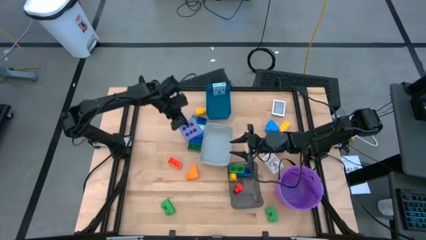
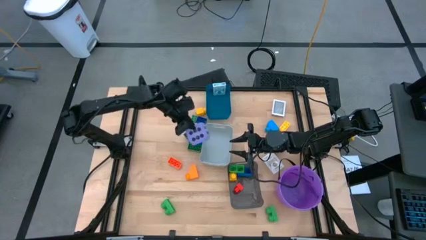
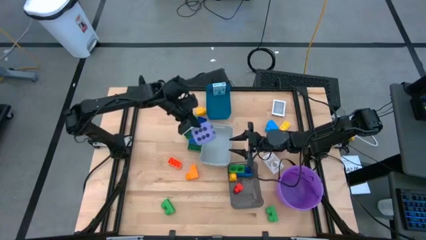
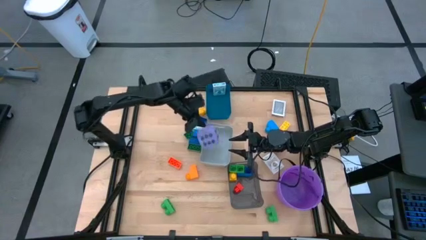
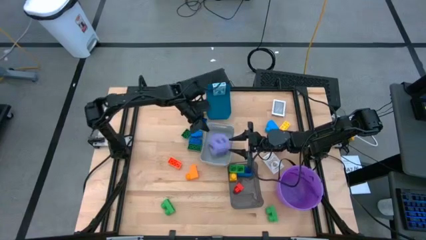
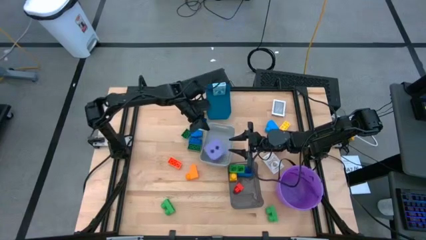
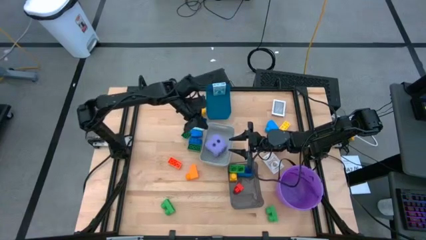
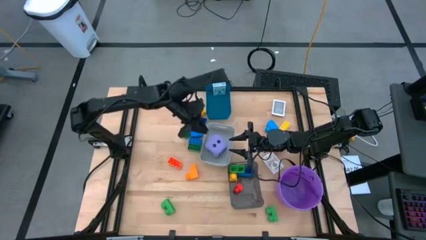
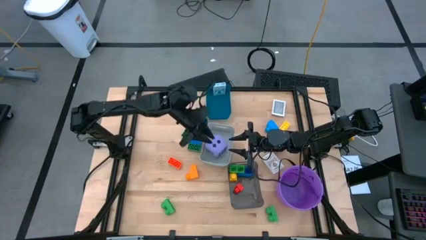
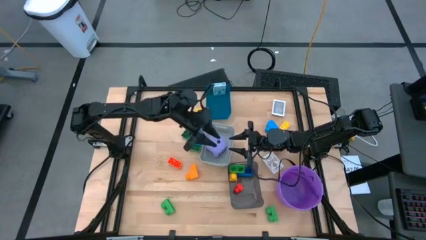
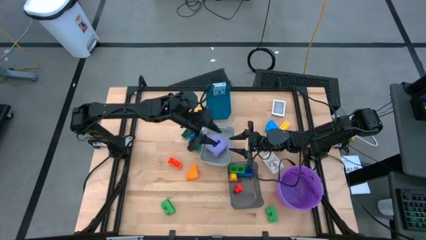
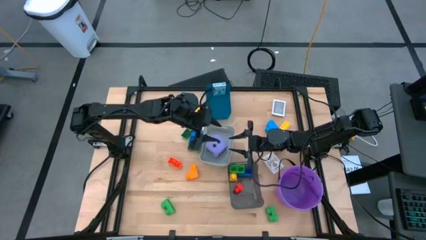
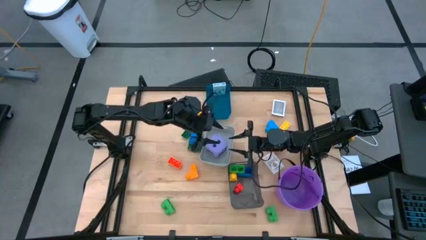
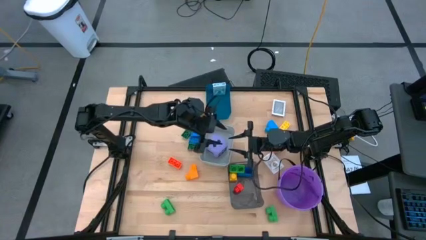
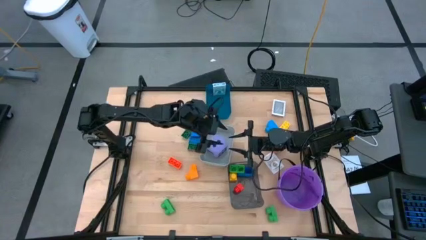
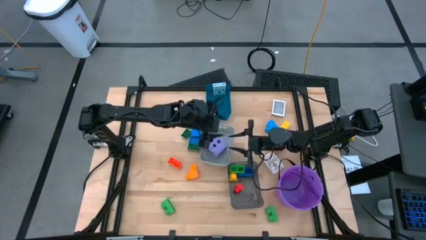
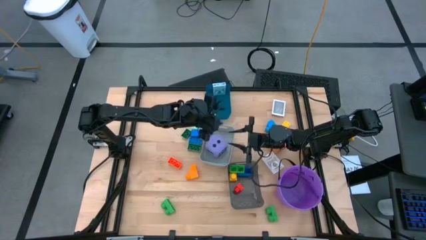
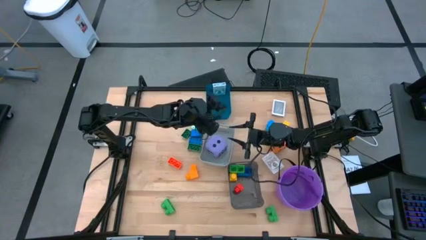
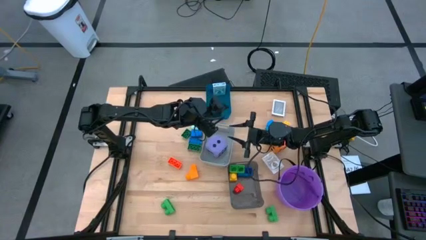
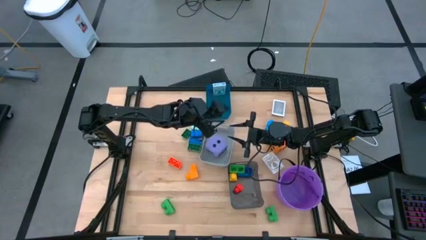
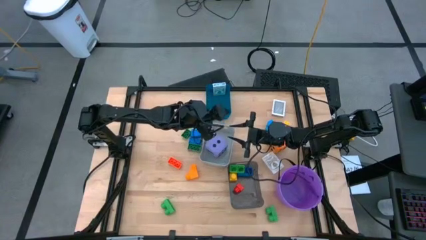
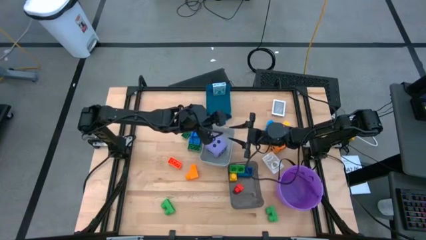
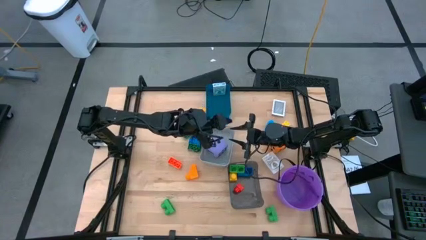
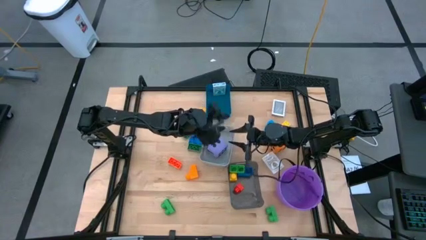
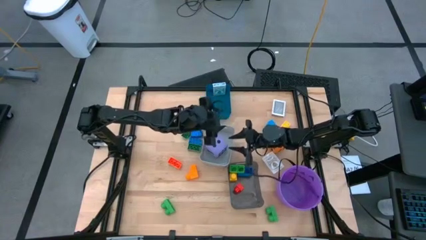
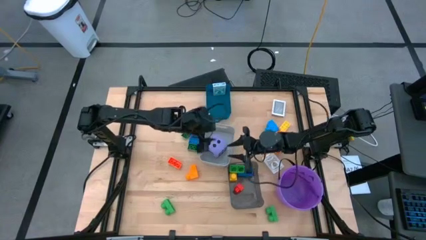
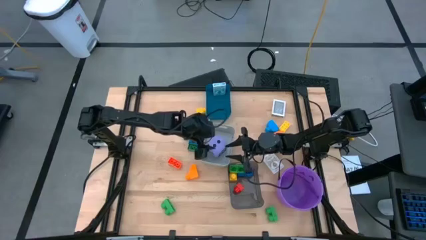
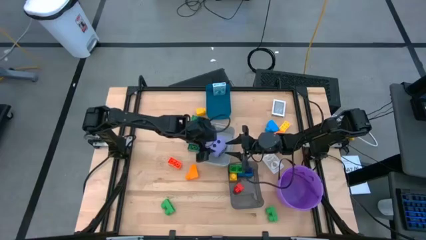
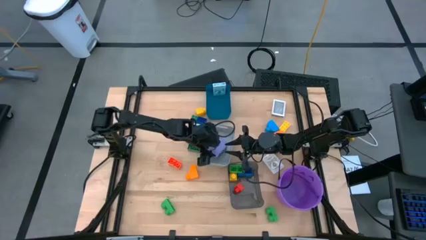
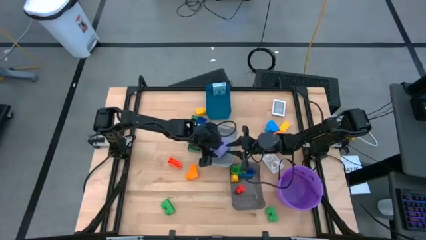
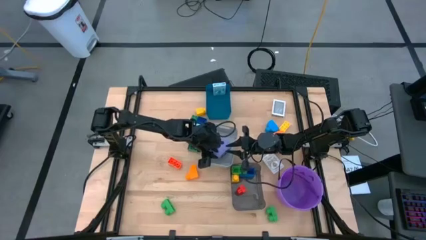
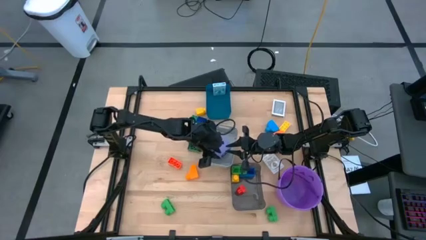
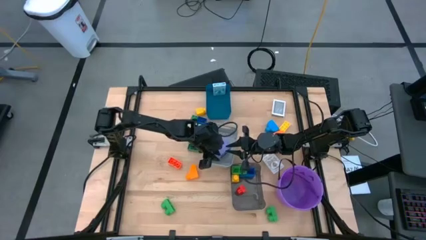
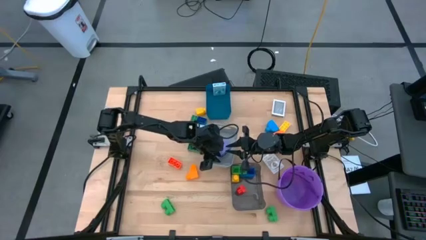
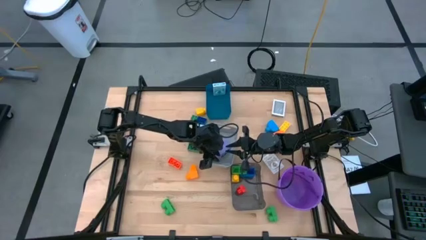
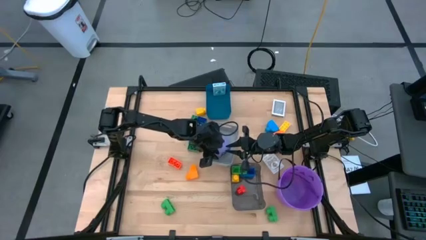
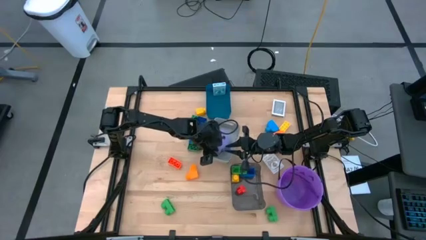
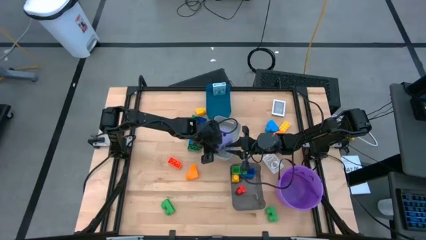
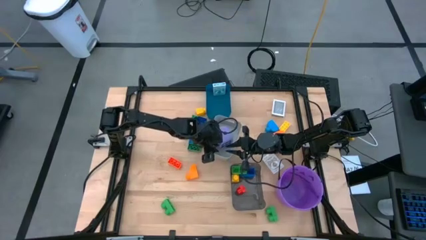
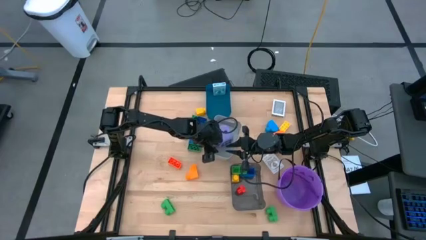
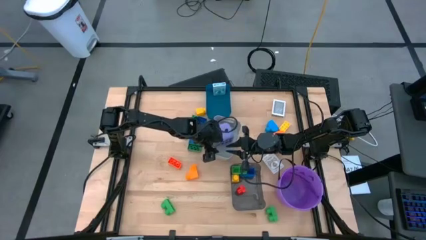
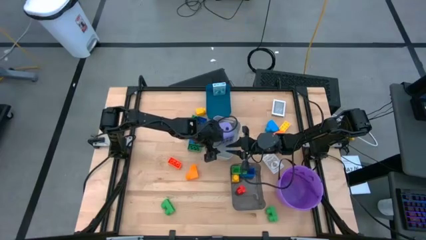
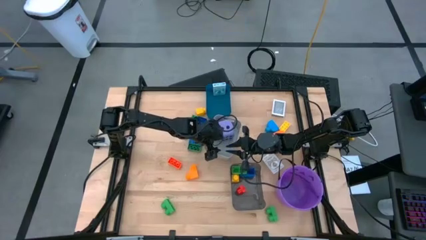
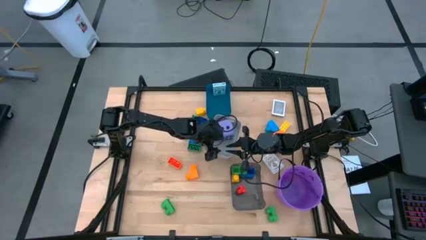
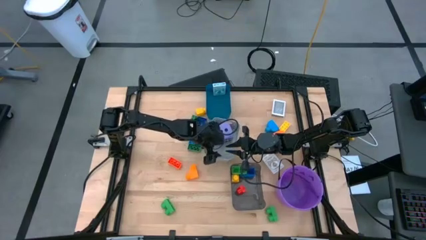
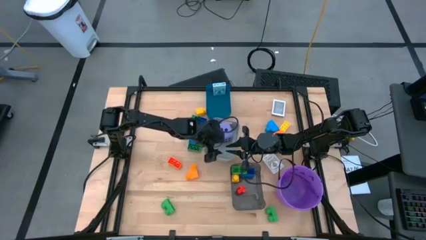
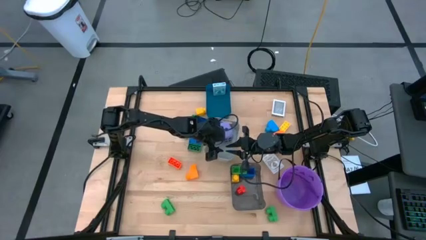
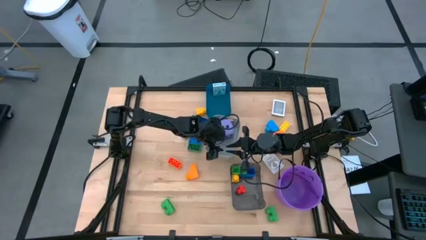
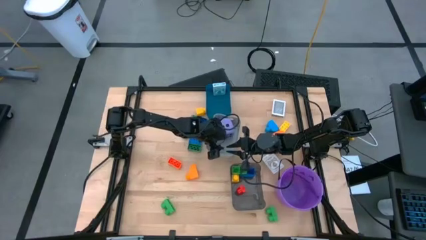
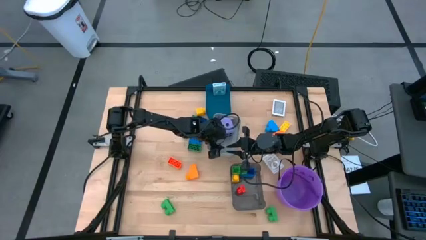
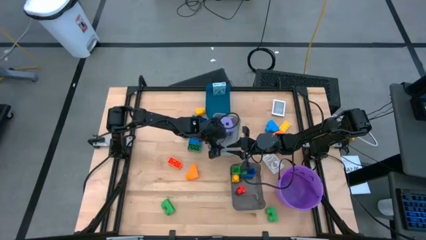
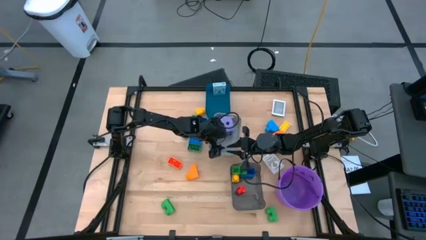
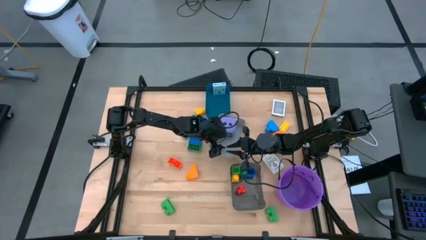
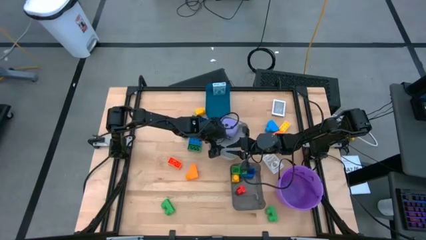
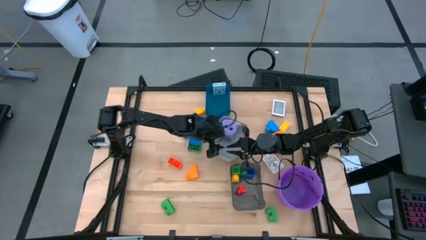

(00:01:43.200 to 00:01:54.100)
Task: Pick & Place Toys
Put the purple dice into the white bin

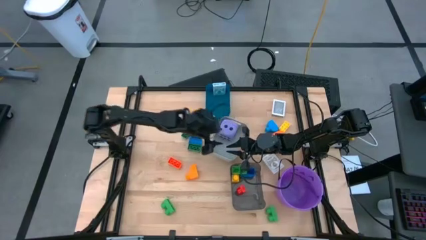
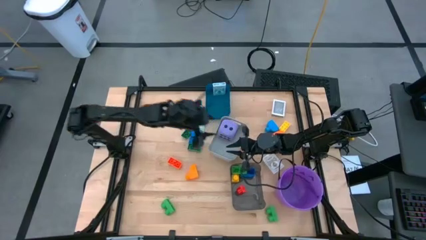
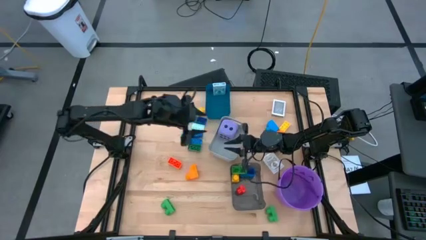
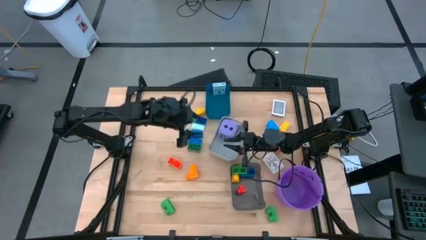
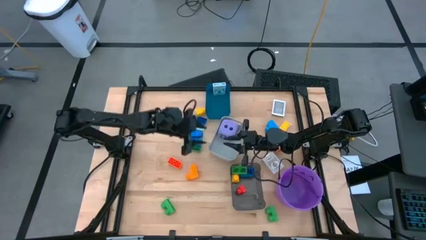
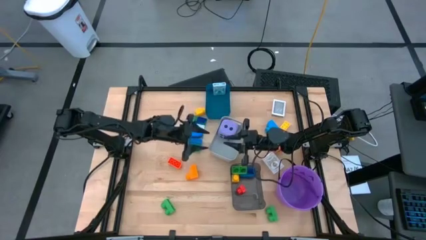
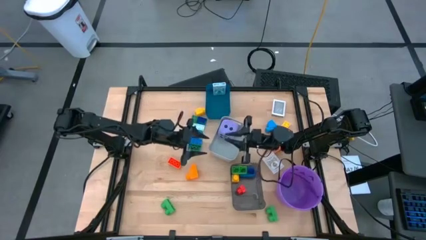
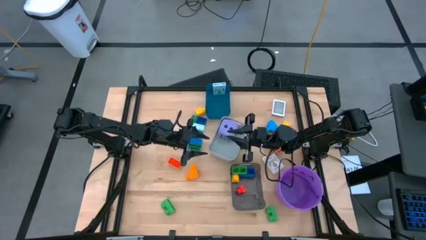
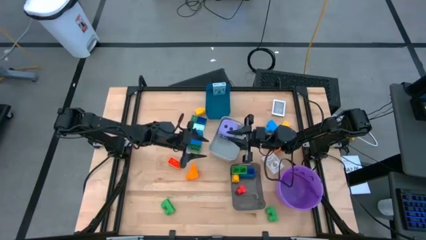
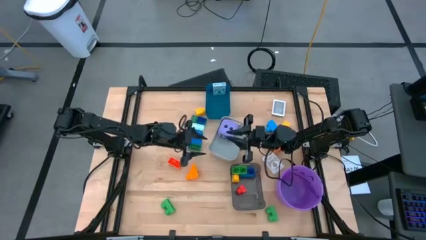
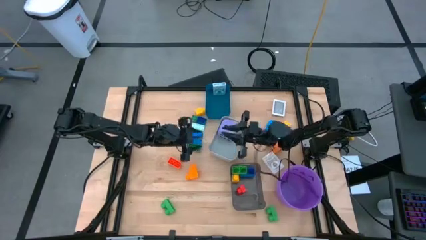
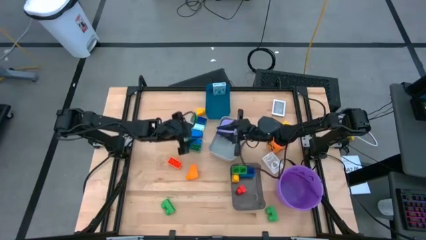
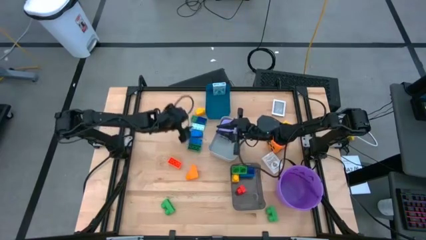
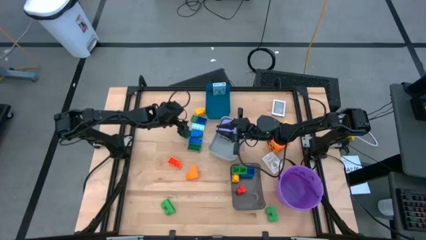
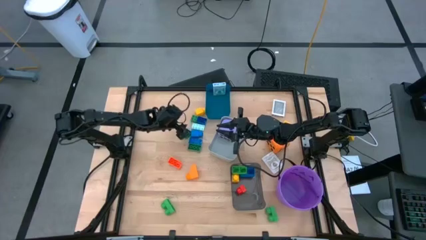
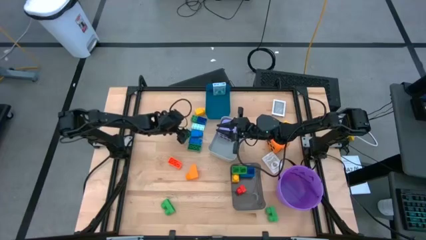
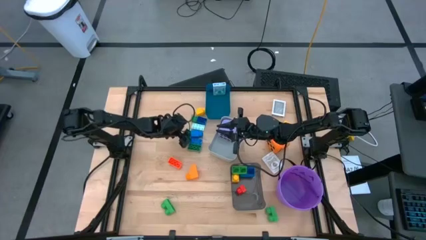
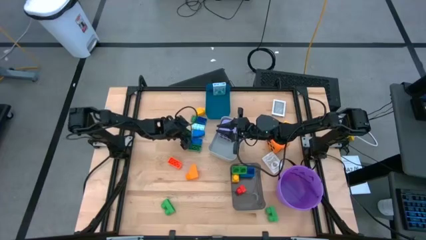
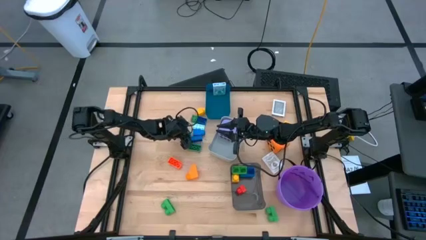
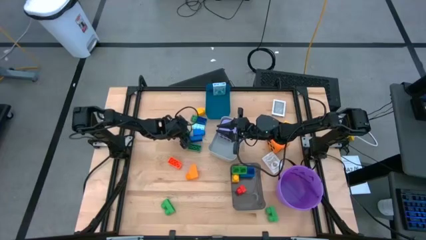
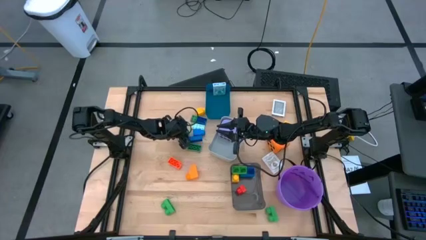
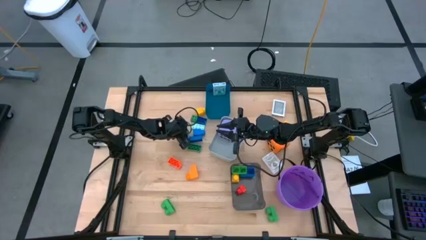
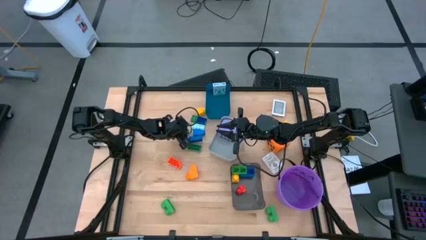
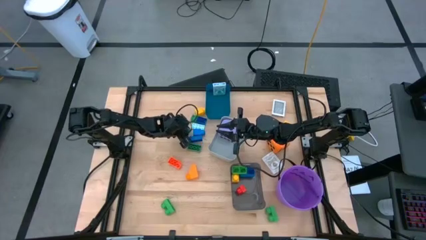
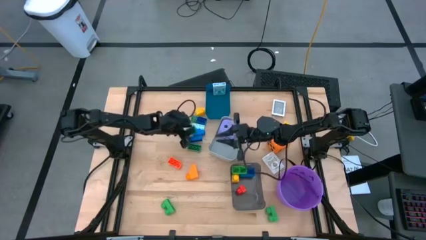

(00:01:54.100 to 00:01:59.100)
Put the dark green game piece into the black bin
